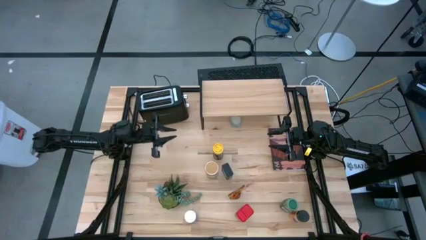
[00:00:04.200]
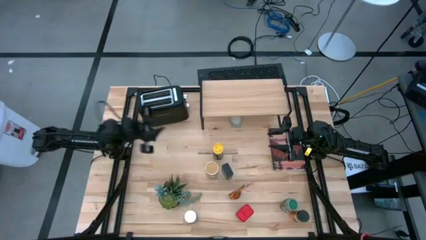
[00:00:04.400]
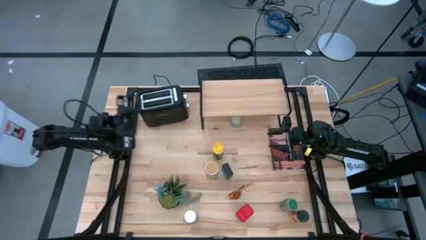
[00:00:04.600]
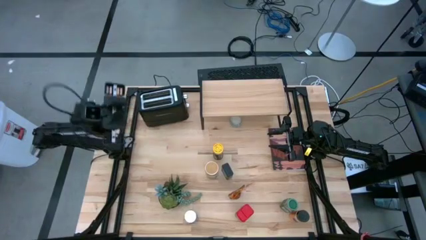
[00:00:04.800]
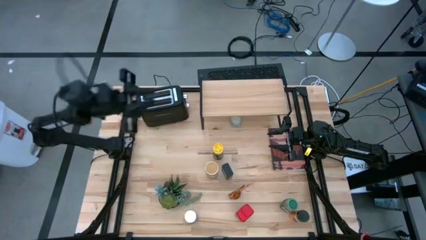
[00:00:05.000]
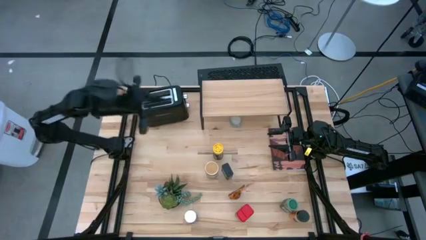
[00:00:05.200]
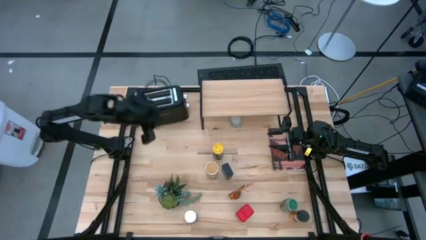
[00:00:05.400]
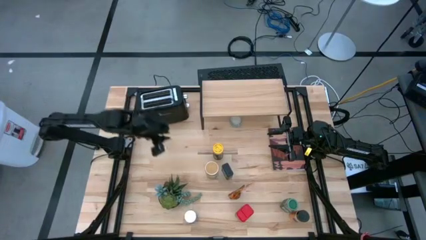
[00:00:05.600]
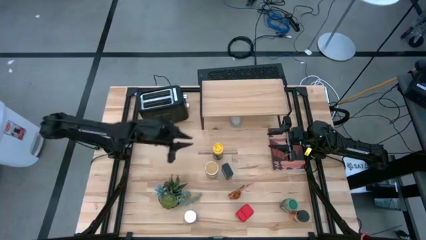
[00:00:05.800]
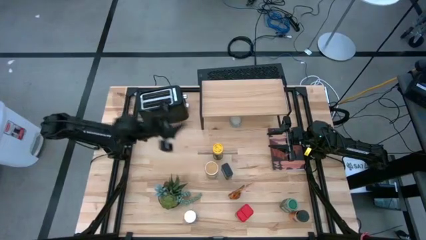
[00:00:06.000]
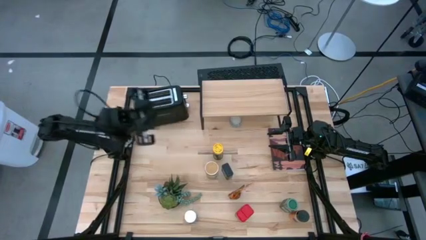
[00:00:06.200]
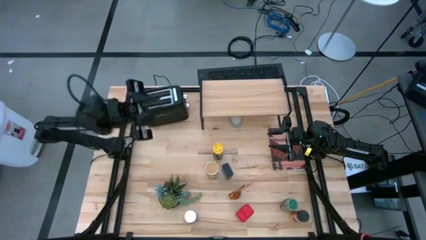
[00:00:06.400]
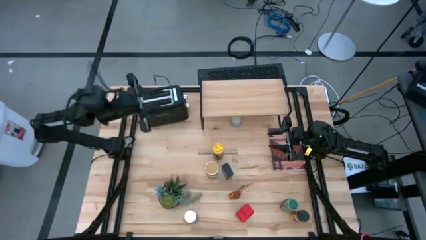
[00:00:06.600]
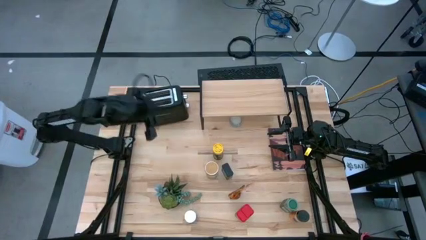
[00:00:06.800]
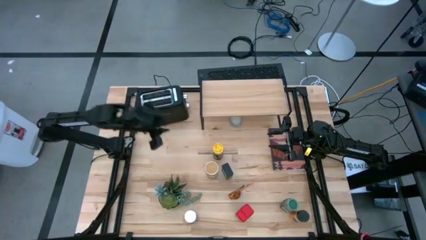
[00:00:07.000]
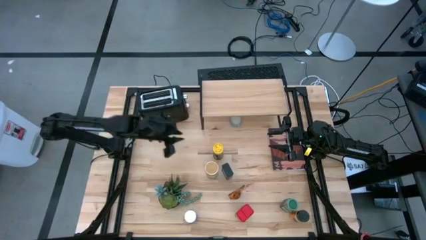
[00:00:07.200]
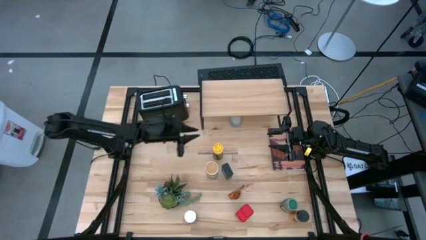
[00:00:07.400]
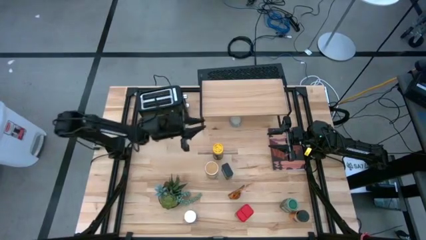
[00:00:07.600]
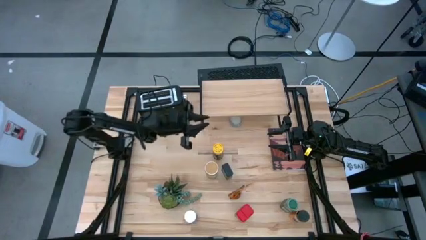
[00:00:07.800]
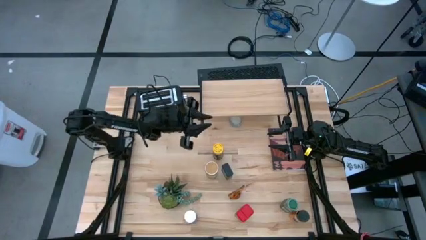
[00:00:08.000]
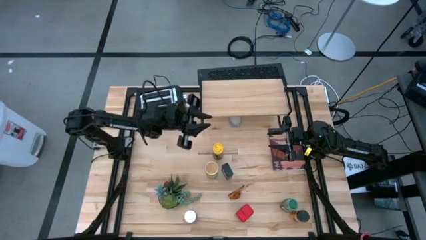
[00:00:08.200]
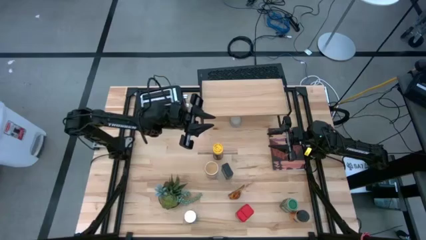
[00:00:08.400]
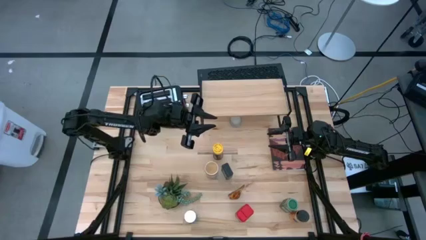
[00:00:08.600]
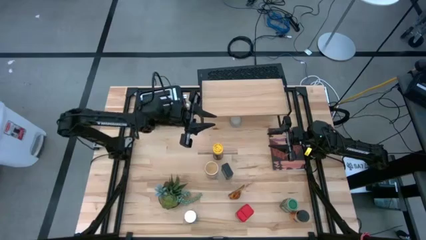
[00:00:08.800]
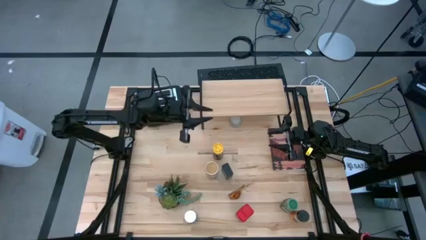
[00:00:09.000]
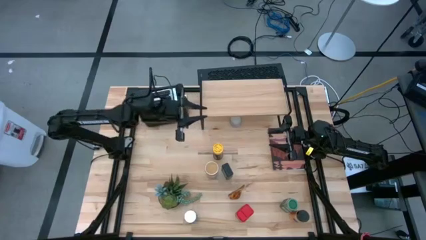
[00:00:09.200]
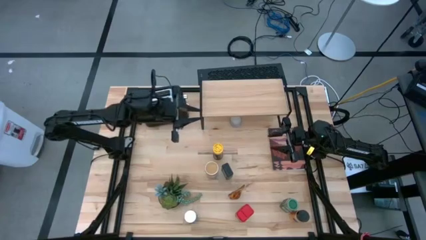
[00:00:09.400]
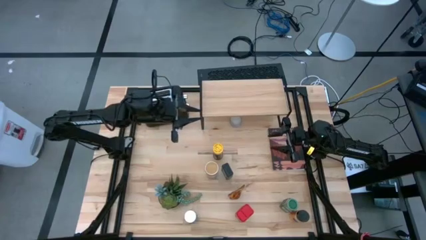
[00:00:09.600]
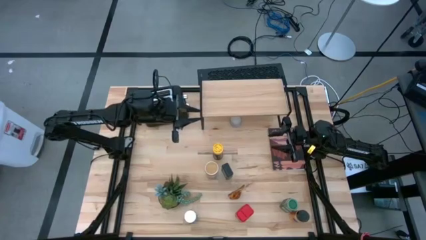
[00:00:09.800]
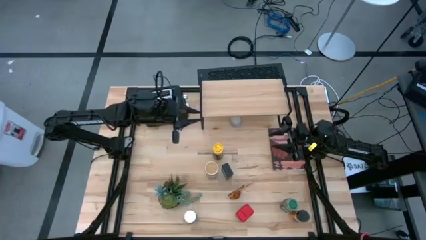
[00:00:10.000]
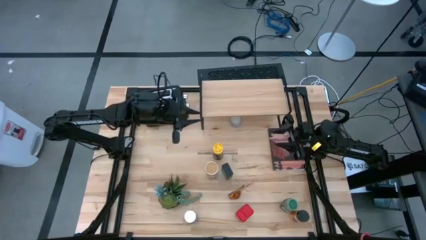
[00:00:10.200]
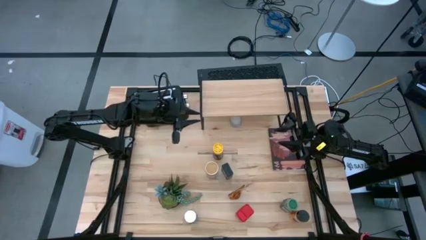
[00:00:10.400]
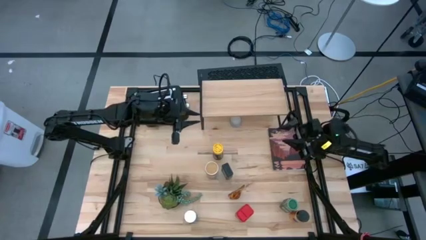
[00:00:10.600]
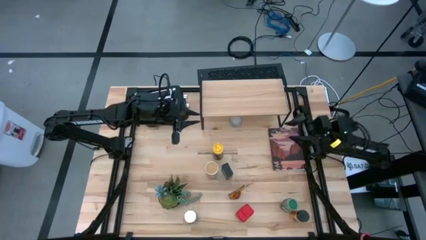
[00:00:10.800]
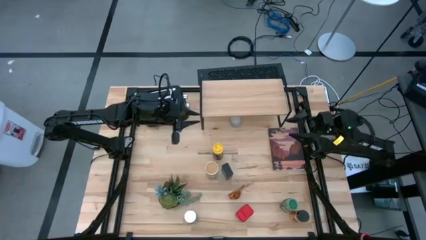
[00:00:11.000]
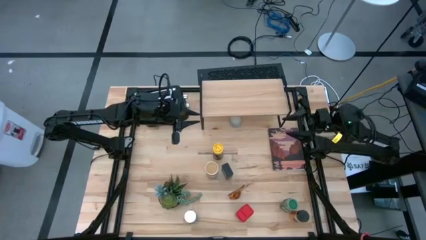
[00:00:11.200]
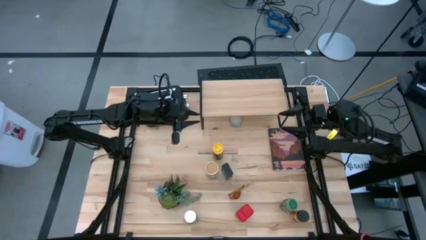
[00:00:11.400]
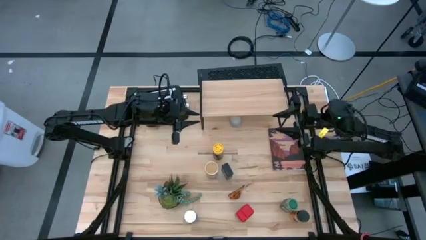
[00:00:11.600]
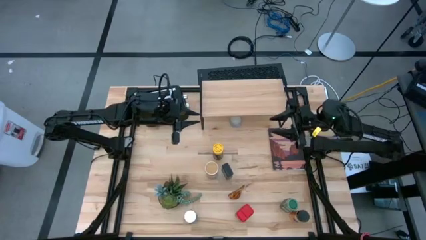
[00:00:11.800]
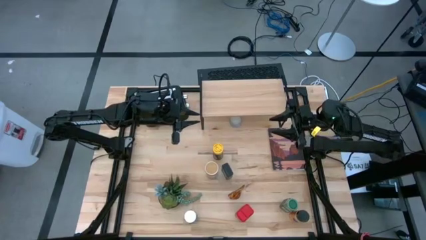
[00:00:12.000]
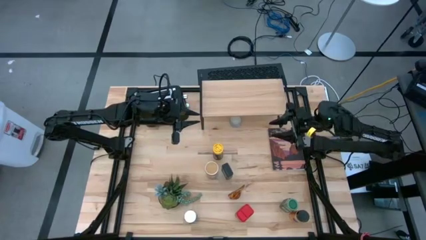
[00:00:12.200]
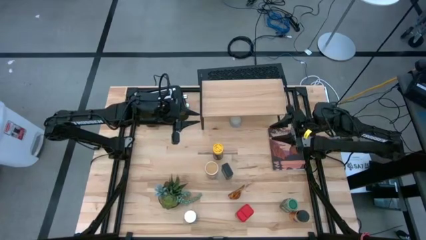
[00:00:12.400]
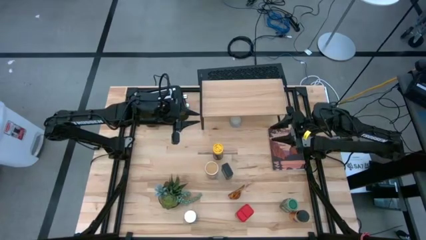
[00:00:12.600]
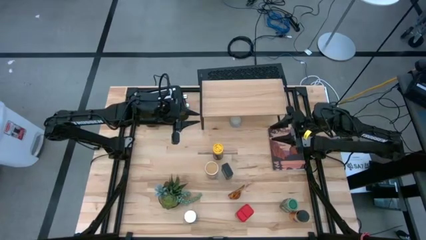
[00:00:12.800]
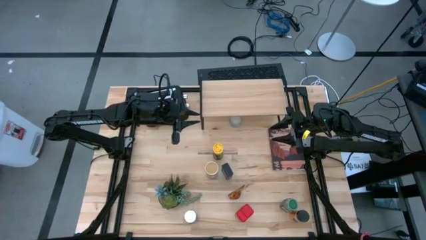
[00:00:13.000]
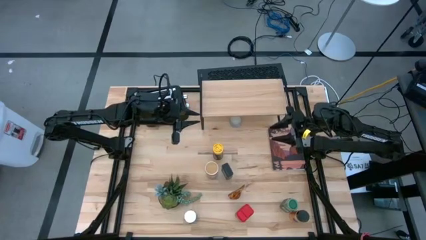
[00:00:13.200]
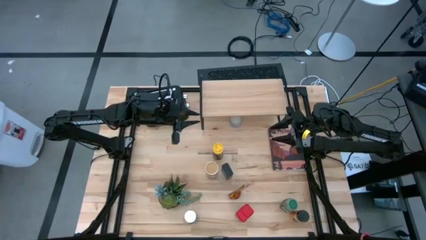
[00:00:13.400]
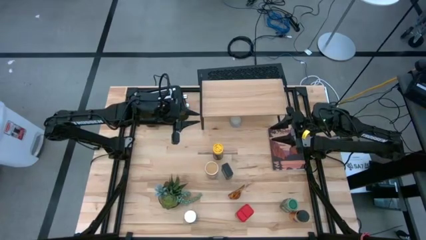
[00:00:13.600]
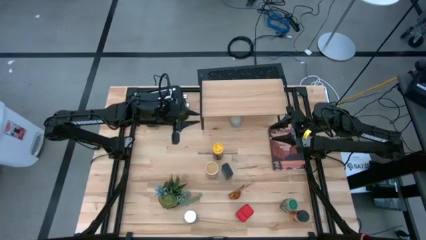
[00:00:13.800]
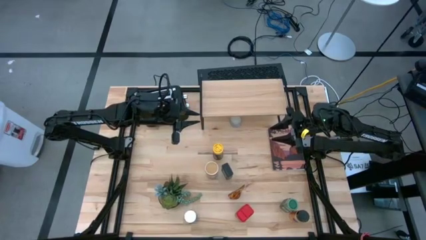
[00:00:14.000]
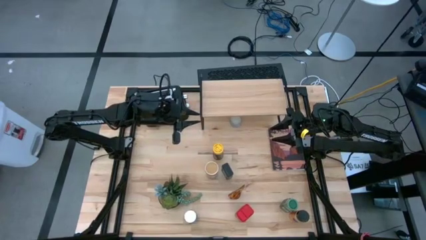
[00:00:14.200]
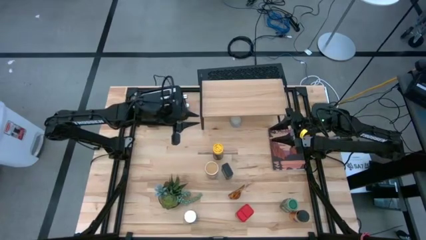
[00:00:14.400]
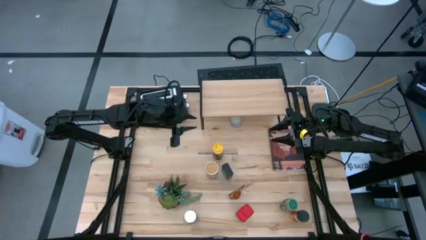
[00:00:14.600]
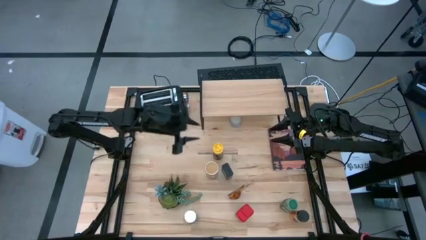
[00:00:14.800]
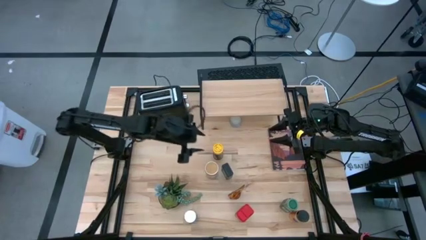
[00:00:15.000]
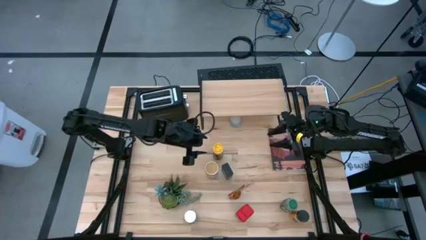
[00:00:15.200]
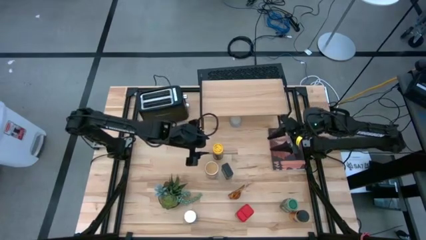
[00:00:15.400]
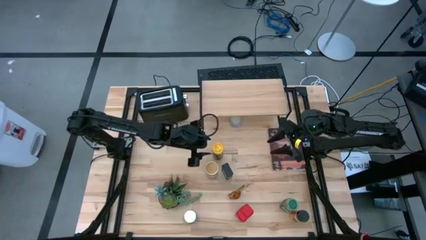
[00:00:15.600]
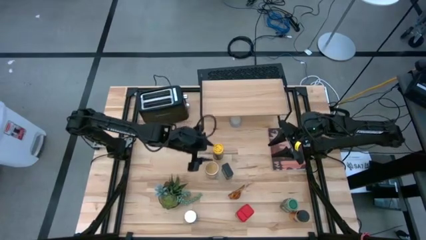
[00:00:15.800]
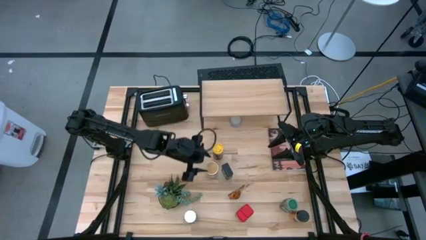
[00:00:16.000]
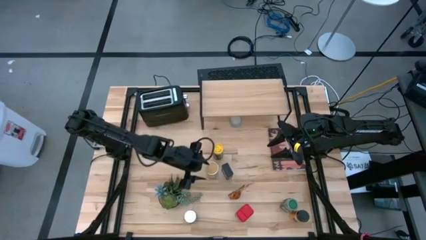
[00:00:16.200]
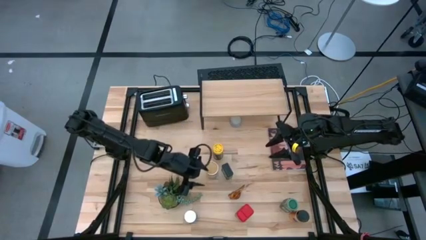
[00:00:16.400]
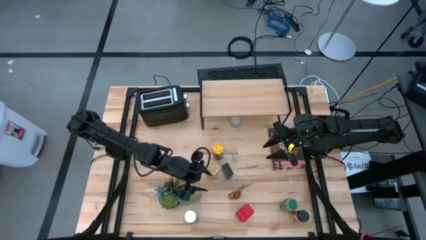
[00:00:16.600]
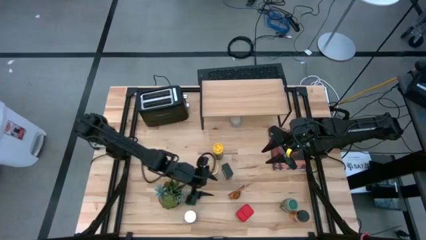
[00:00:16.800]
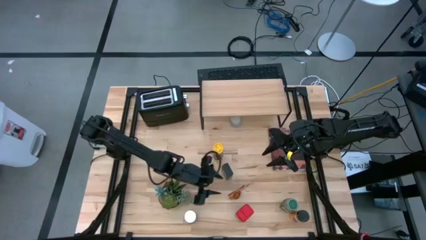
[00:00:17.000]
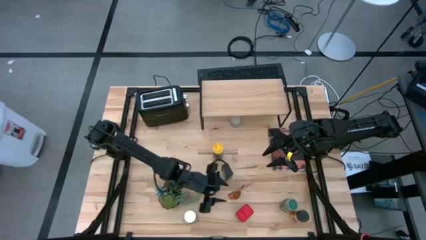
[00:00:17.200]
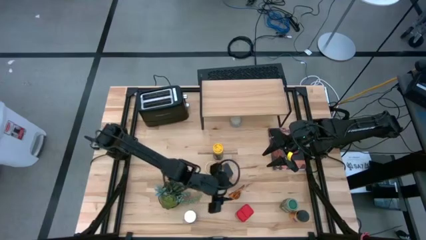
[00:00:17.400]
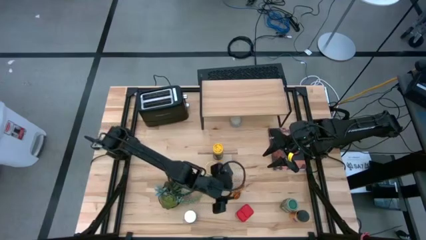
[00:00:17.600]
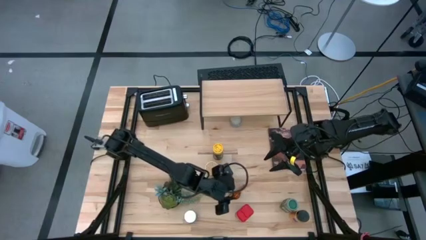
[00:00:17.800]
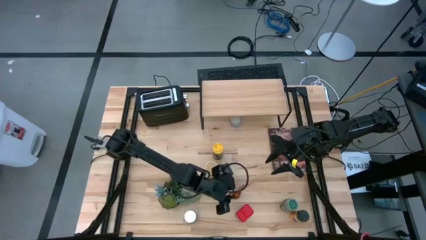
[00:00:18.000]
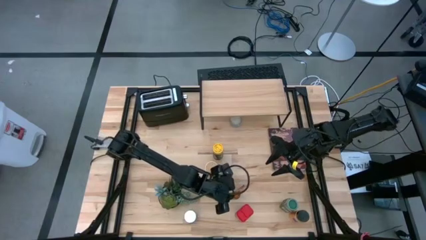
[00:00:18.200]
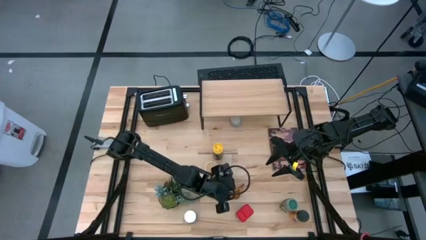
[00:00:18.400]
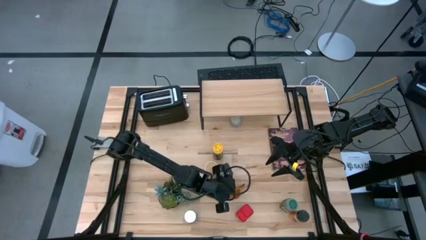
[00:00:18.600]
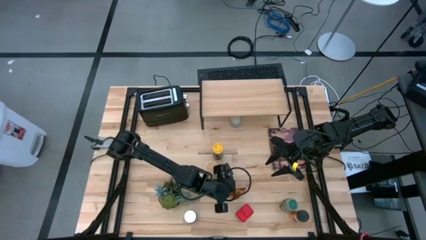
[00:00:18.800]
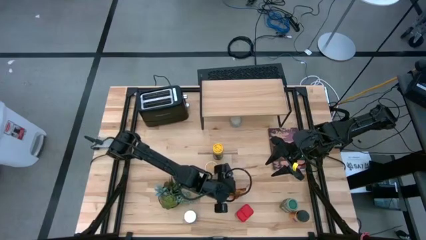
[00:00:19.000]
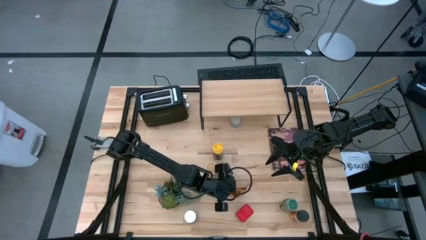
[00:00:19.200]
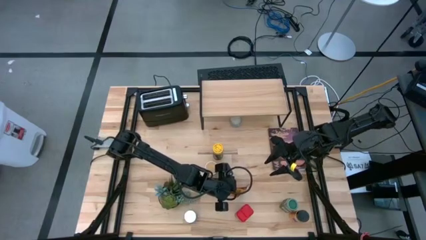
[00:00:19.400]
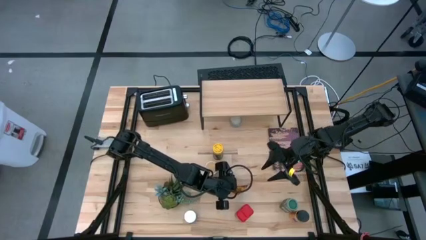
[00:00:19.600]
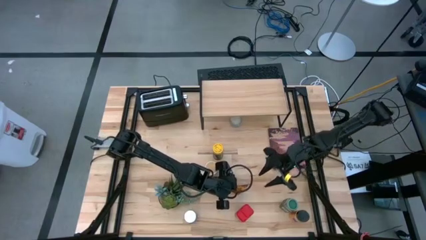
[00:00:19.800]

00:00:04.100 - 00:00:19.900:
Task: Shelf spices
Put the brown seasoning bag on the shelf
